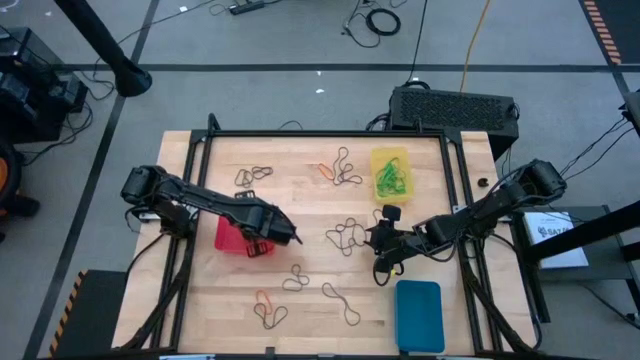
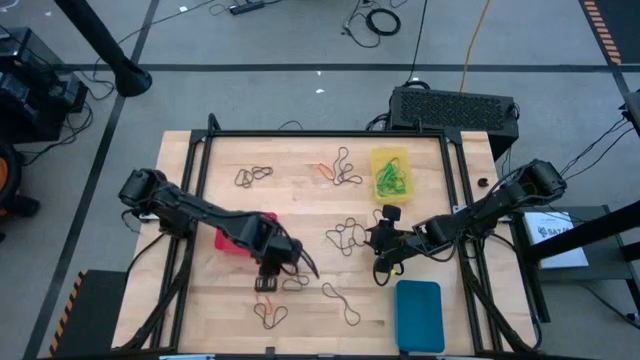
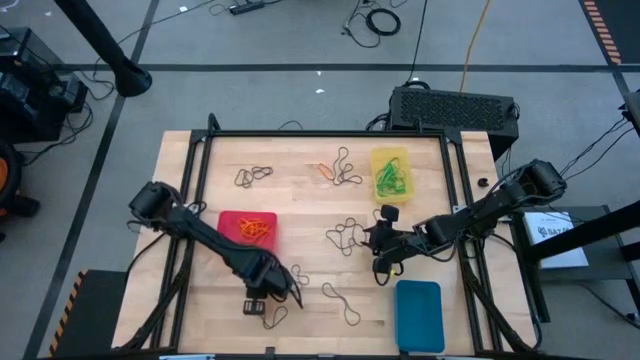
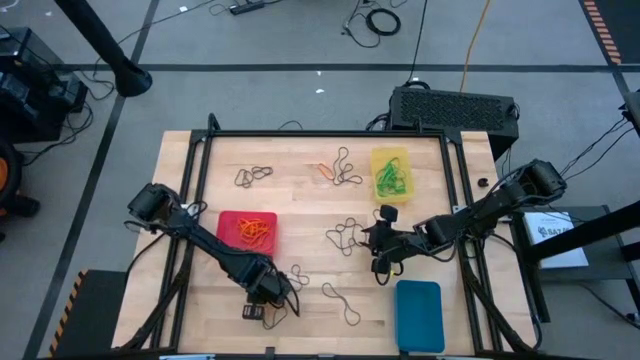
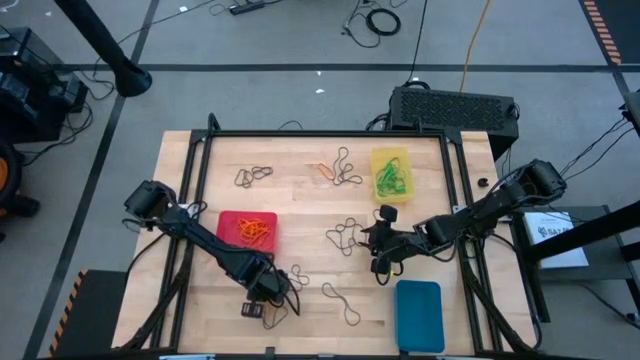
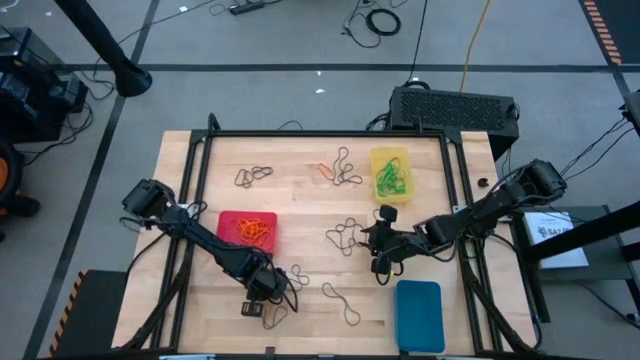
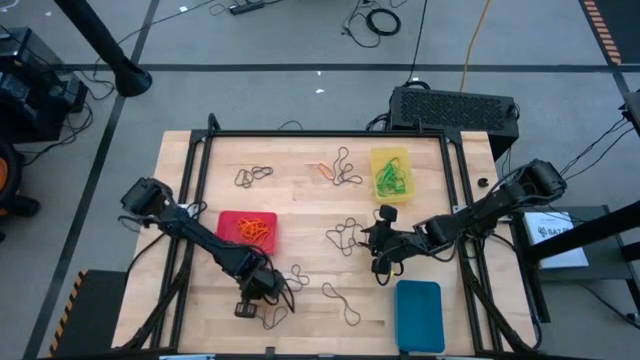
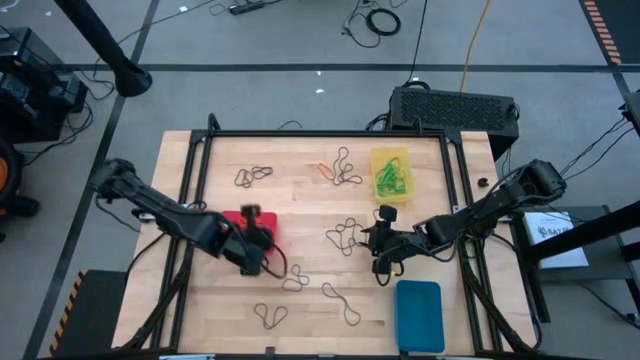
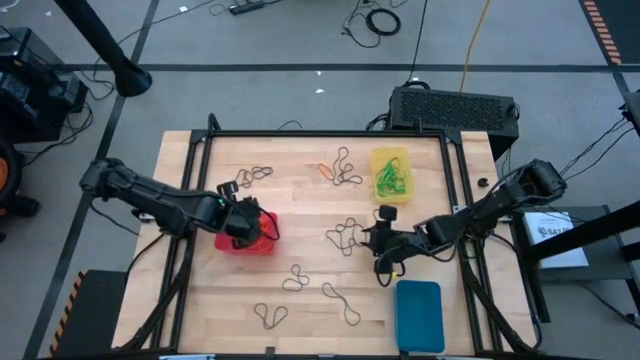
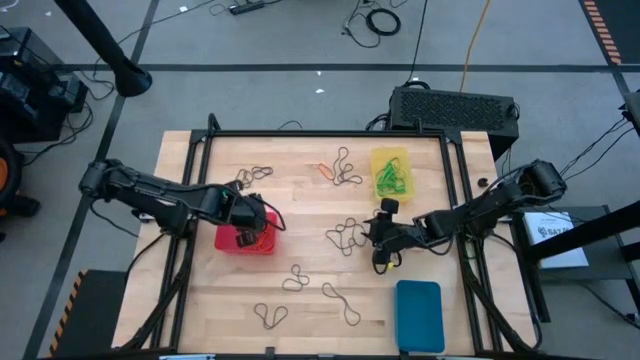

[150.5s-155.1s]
Task: Sort rubber bands into baskets
Put the orange rubber band into the pink bin

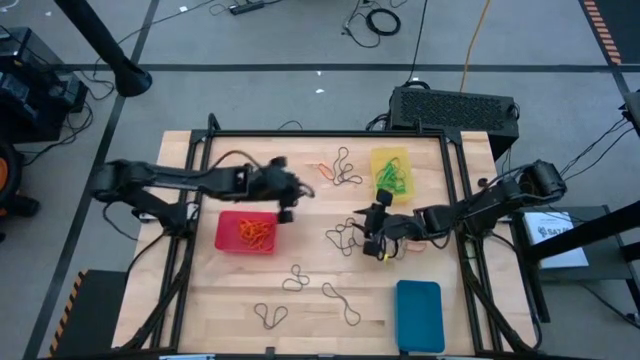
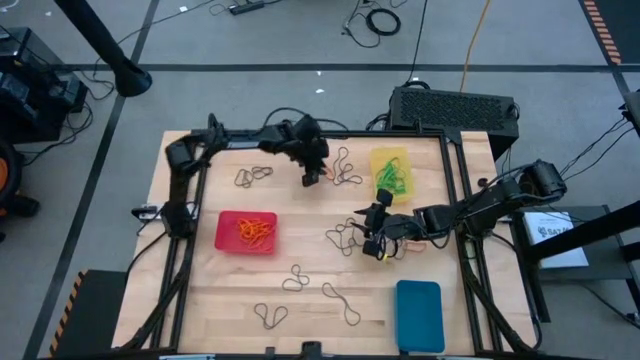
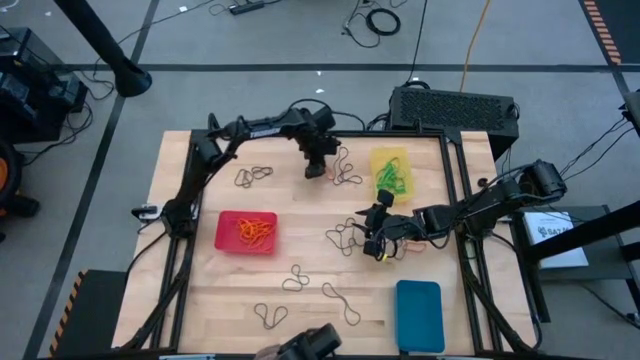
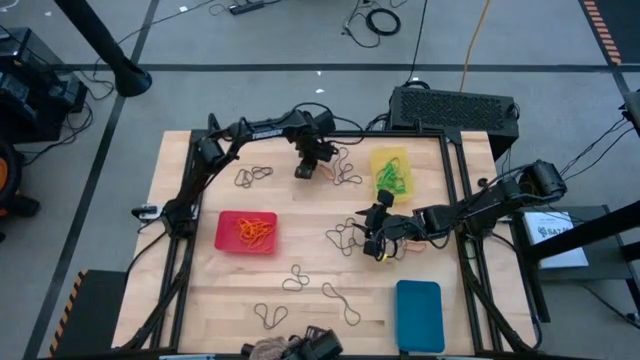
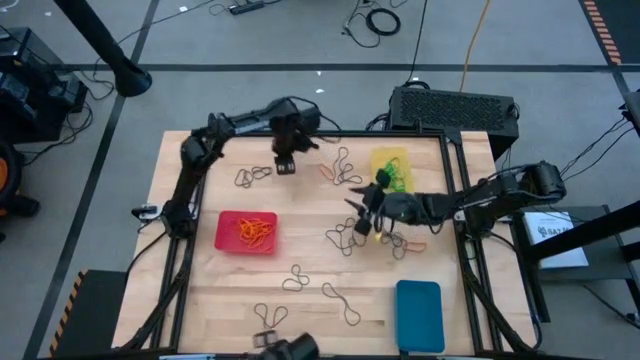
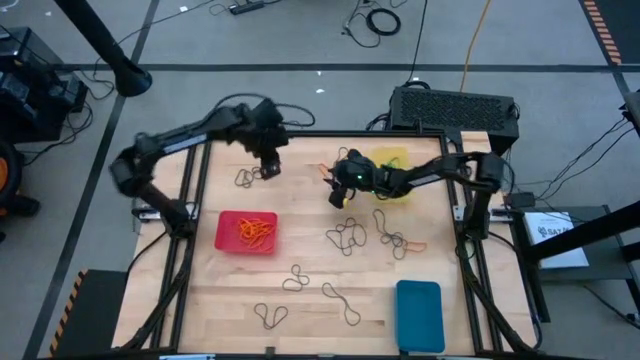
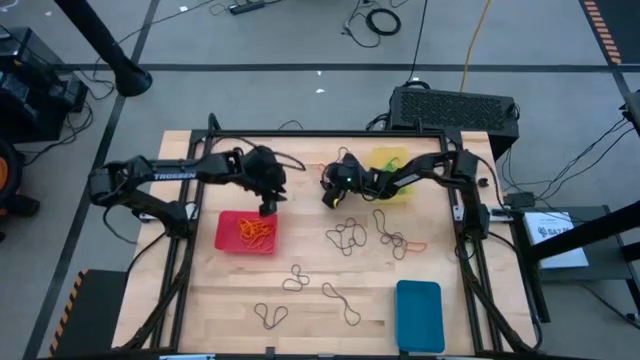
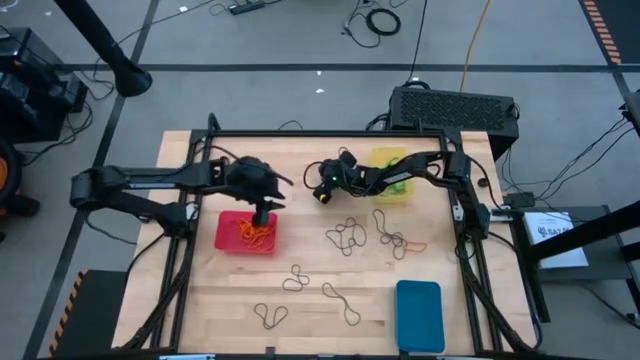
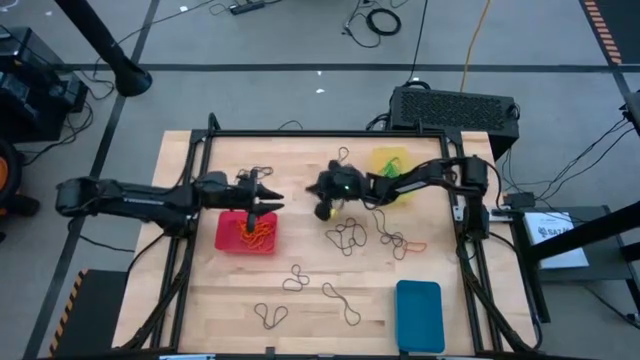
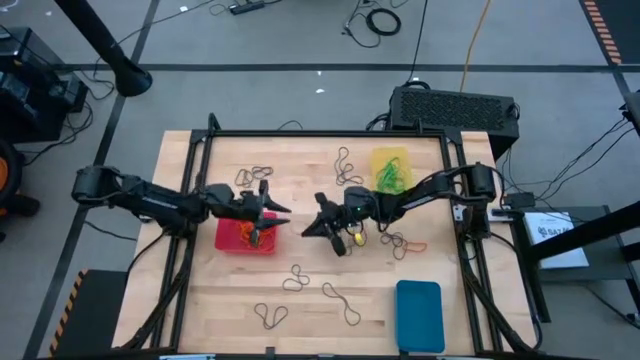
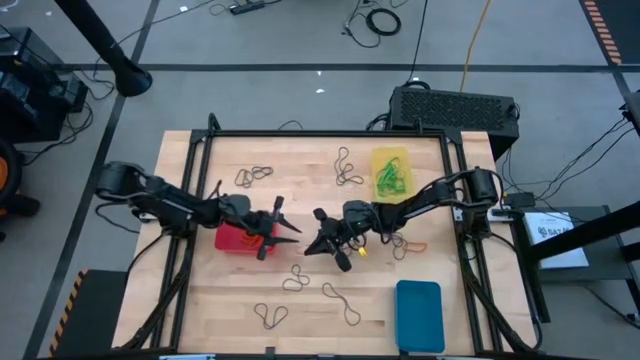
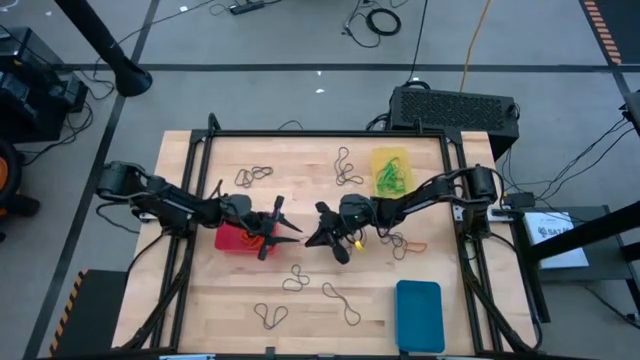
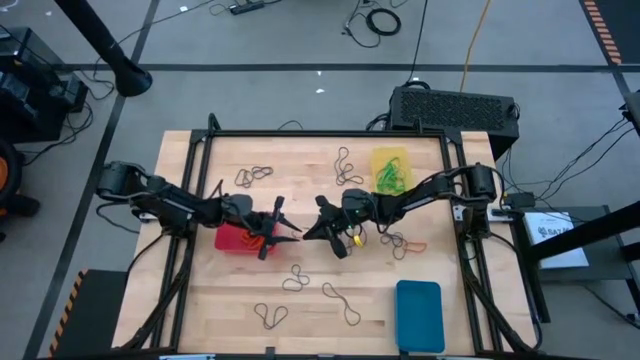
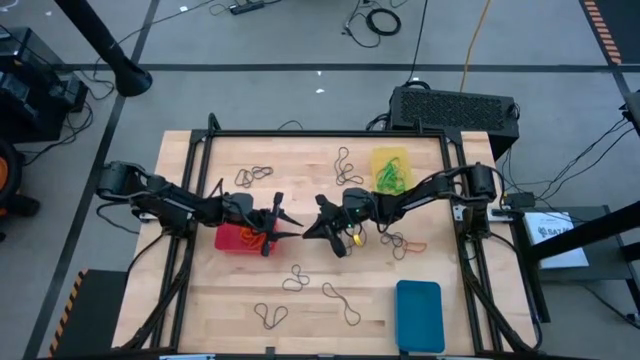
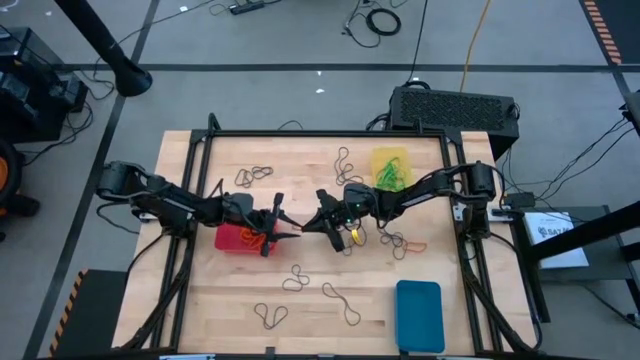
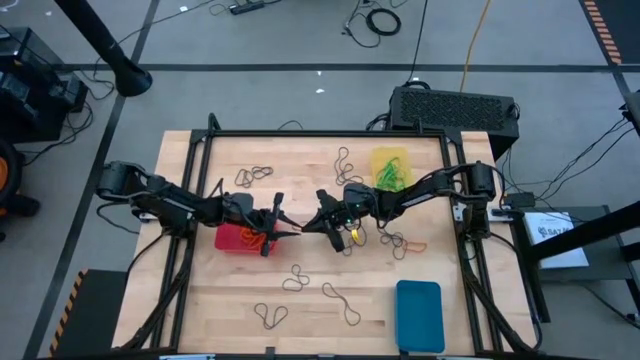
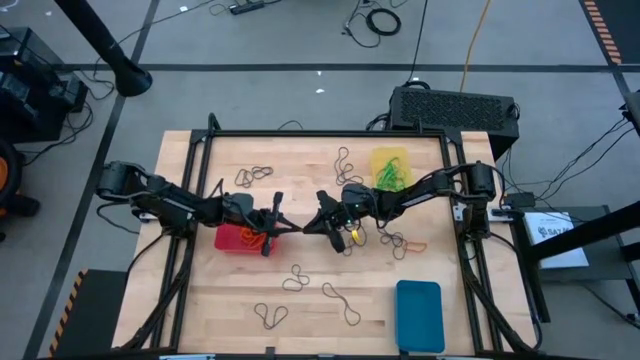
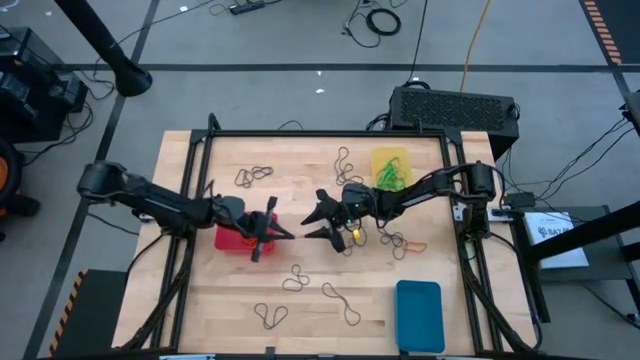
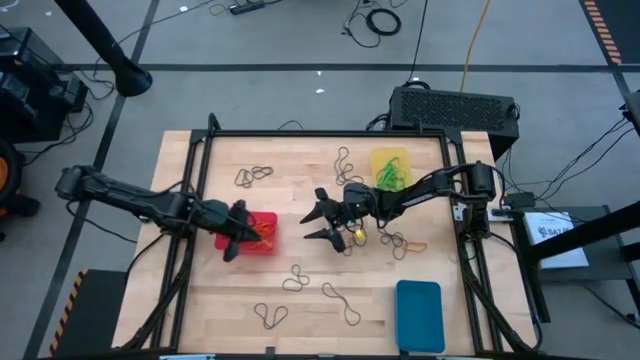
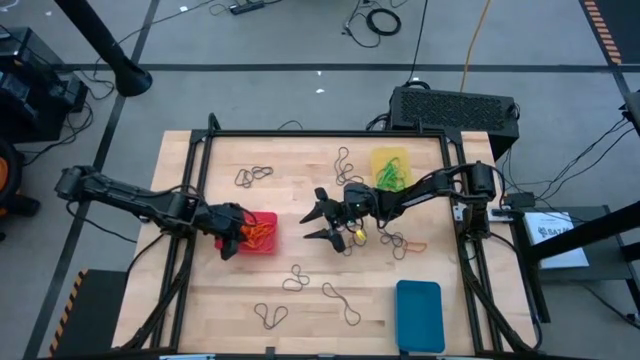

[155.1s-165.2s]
Put the orange rubber band into the pink bin

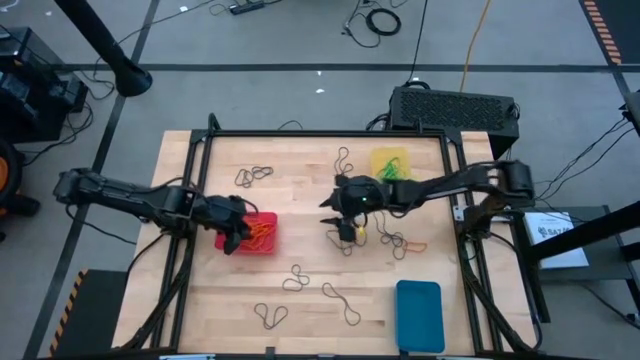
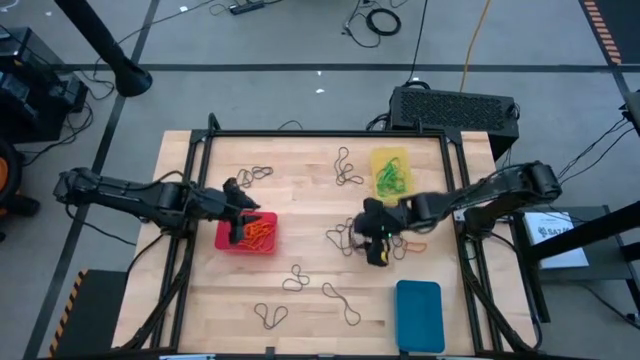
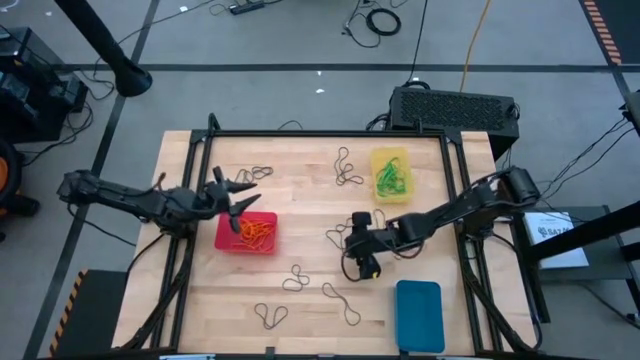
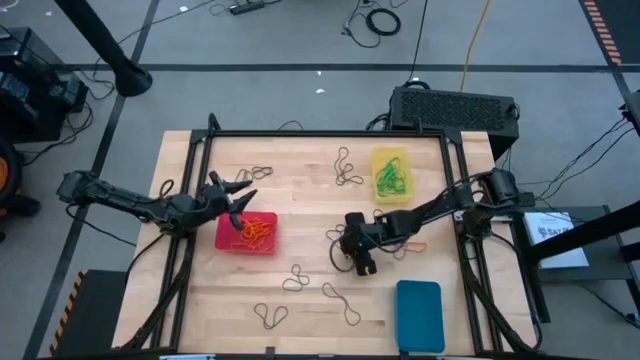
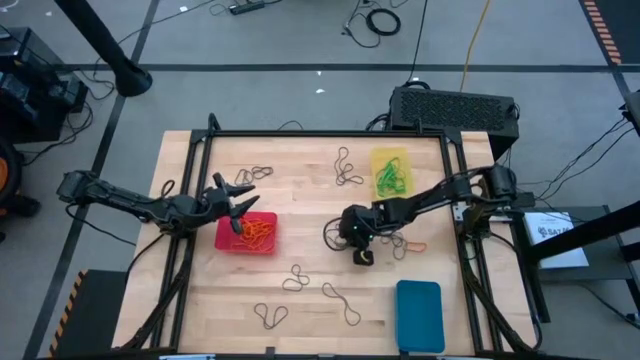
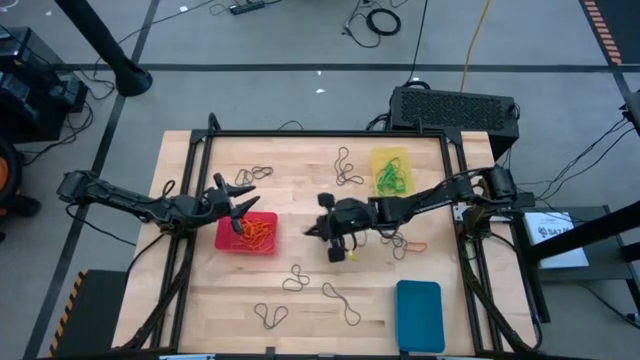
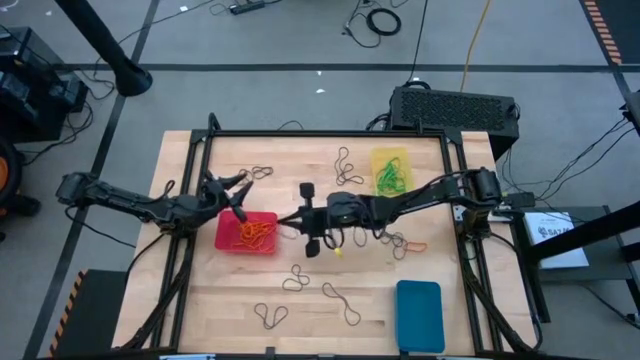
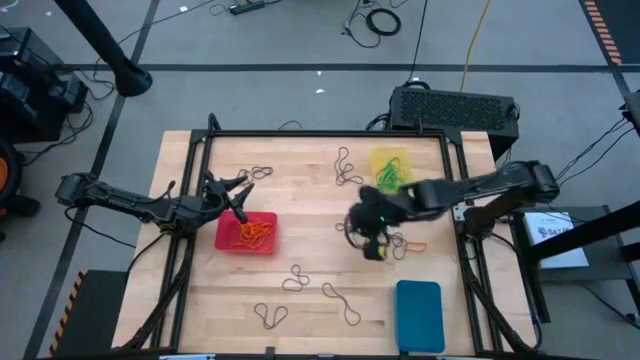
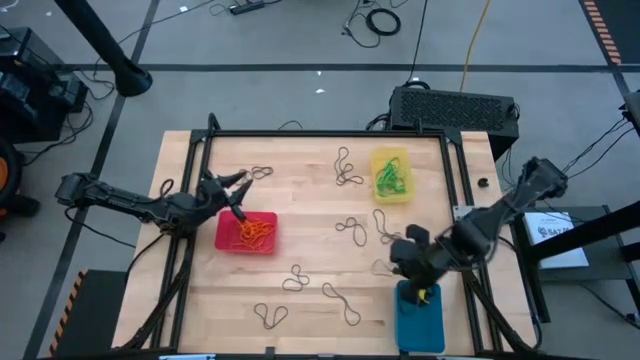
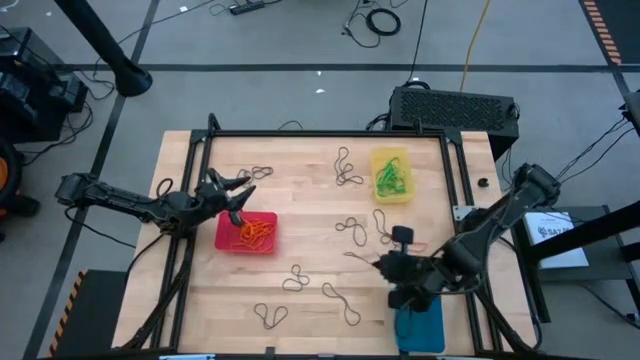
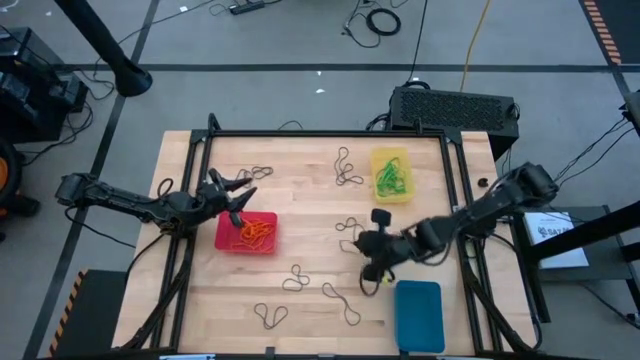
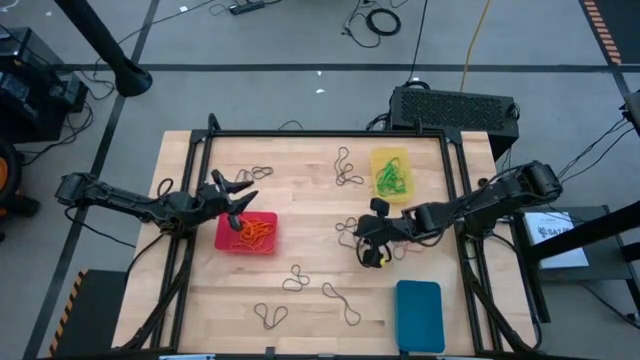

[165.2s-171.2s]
Put the violet rubber band into the blue bin
